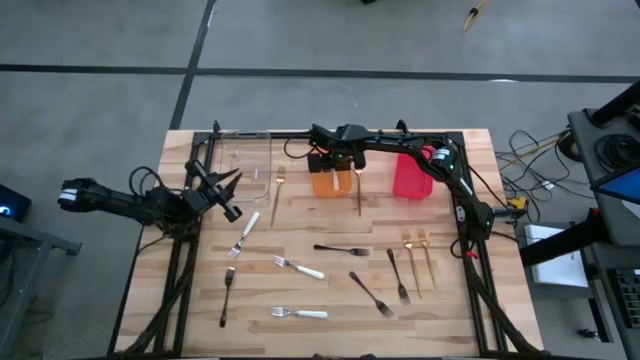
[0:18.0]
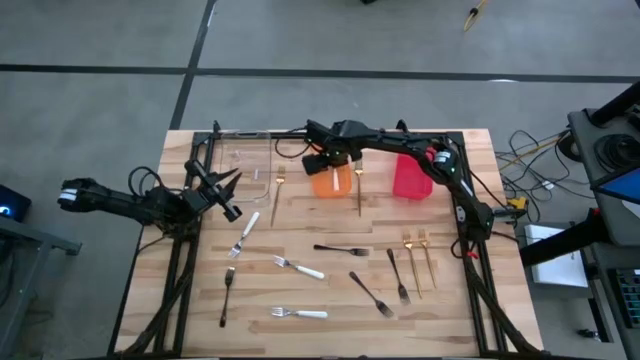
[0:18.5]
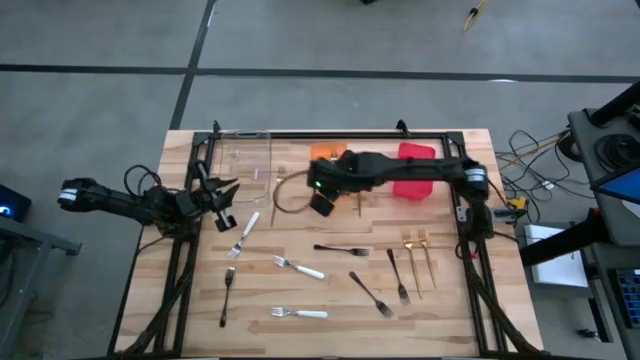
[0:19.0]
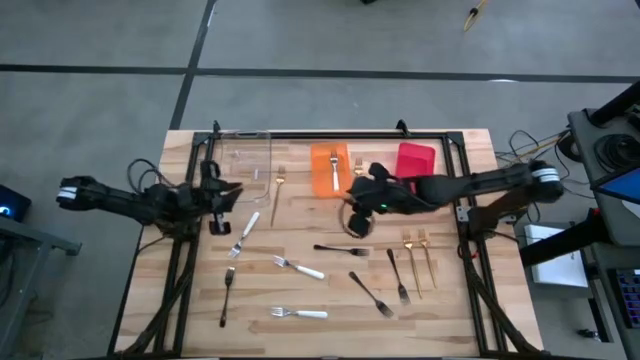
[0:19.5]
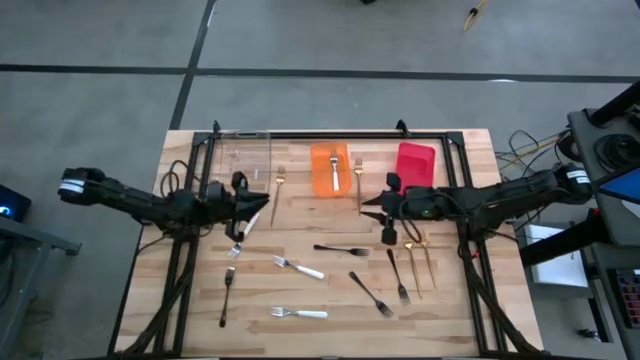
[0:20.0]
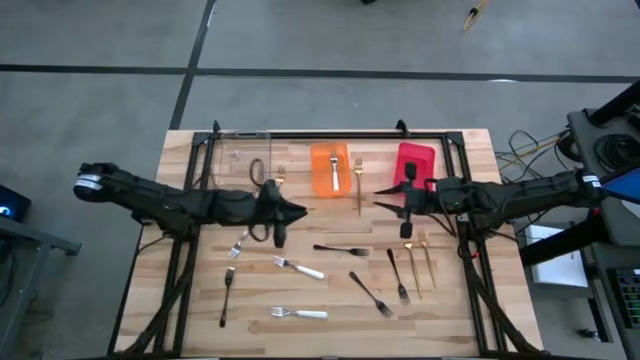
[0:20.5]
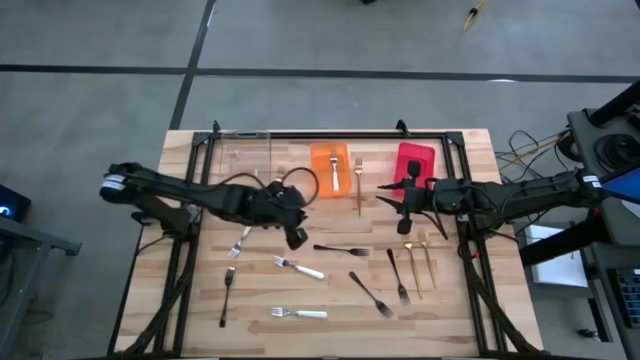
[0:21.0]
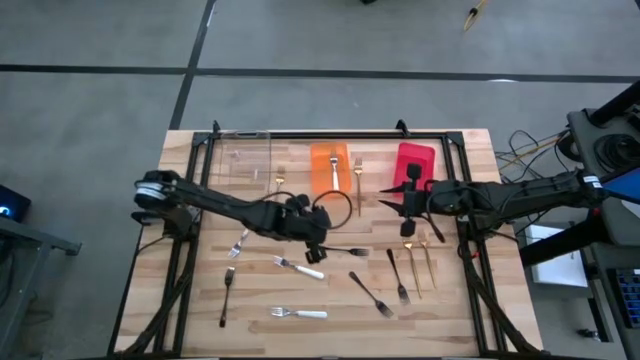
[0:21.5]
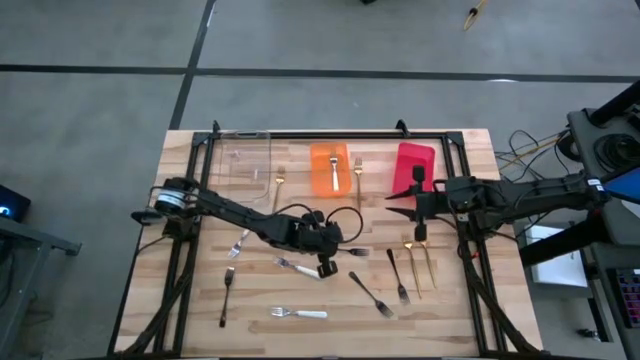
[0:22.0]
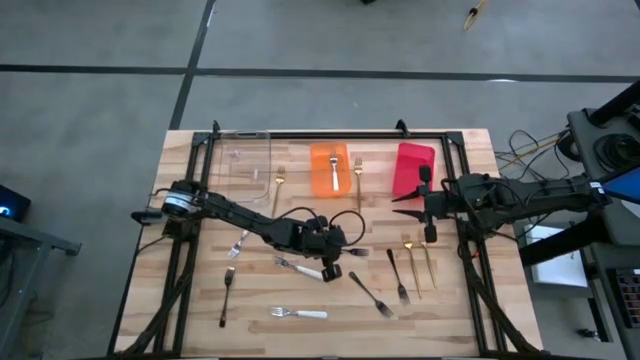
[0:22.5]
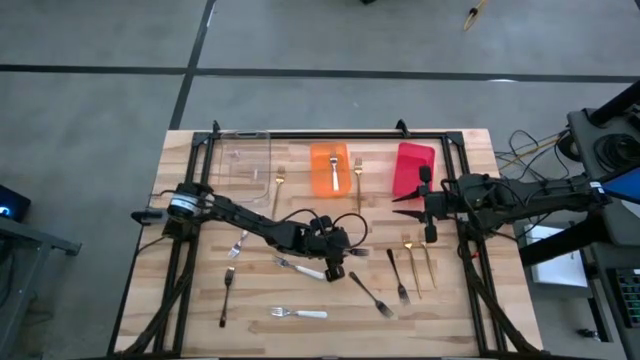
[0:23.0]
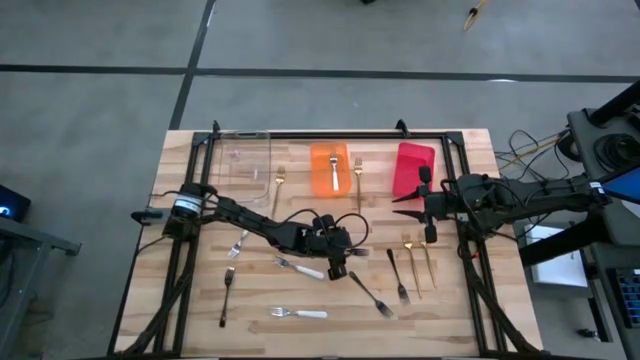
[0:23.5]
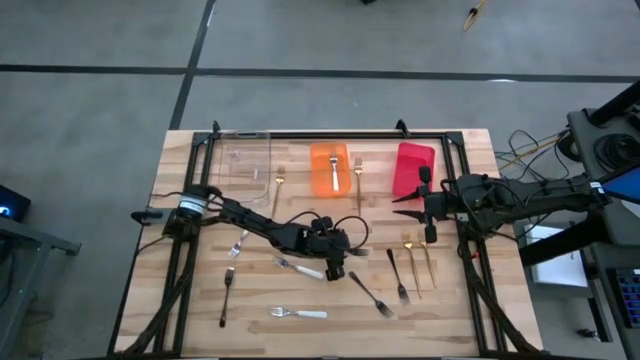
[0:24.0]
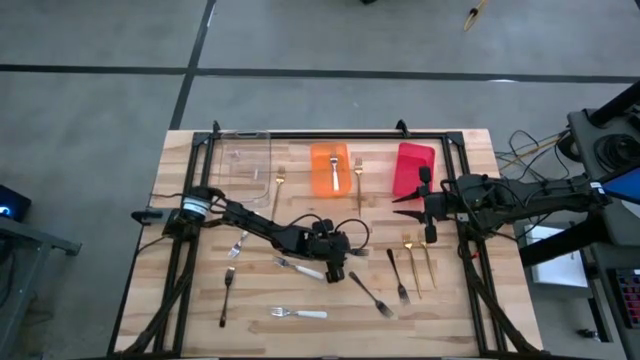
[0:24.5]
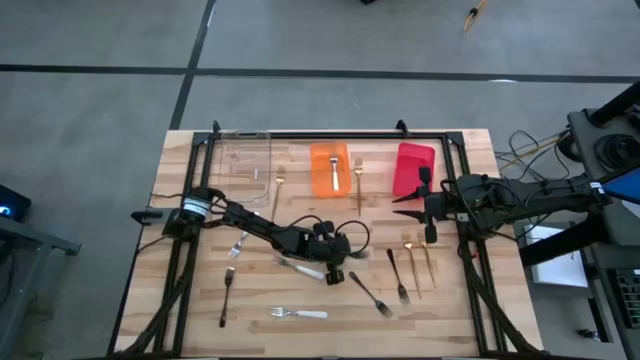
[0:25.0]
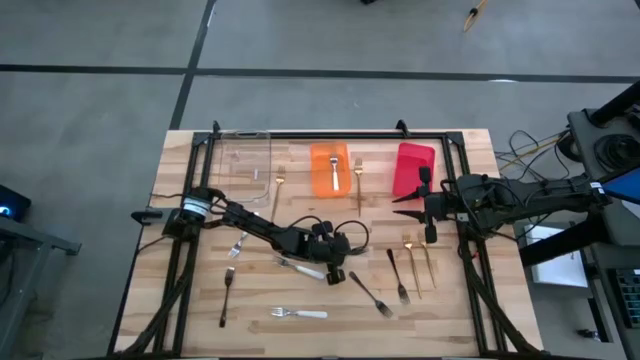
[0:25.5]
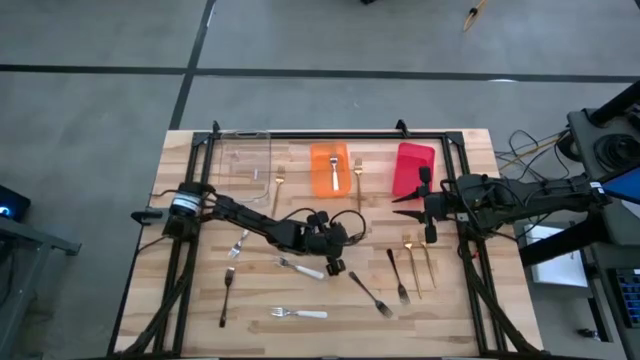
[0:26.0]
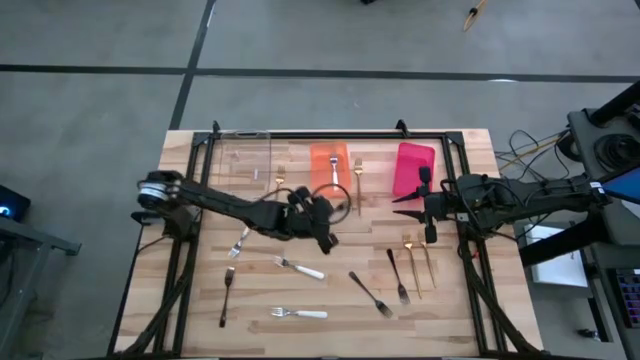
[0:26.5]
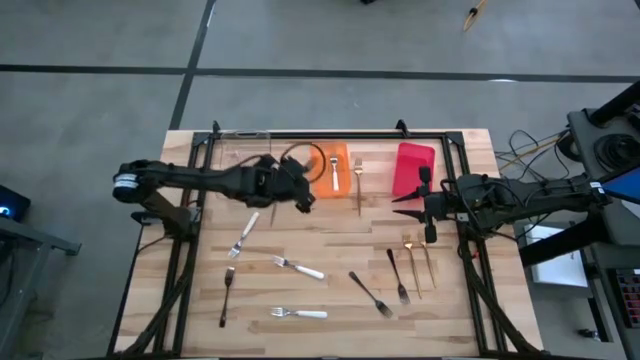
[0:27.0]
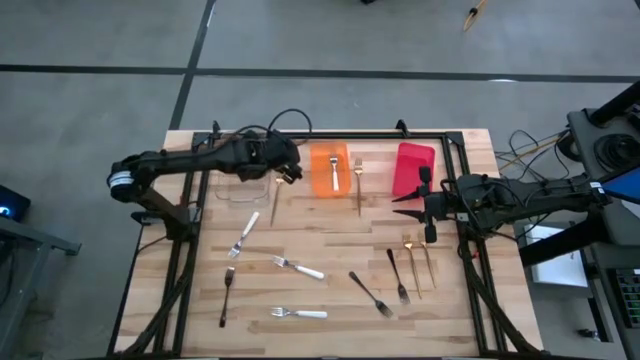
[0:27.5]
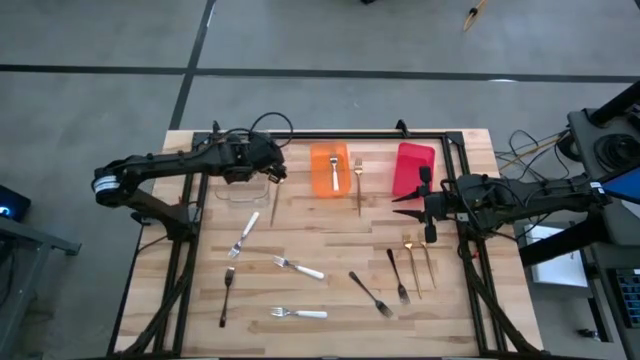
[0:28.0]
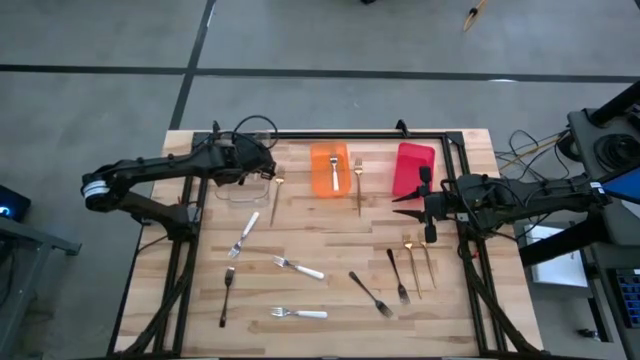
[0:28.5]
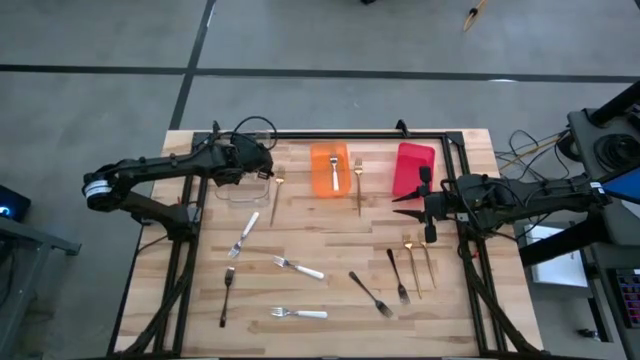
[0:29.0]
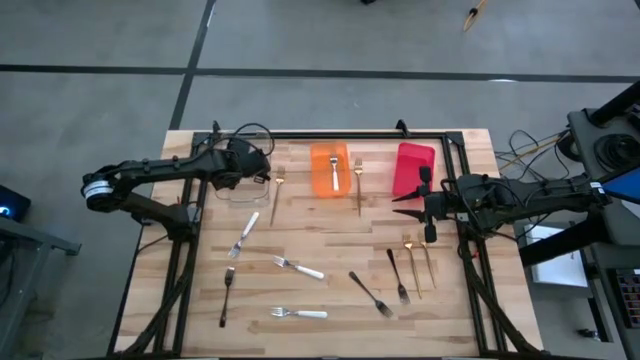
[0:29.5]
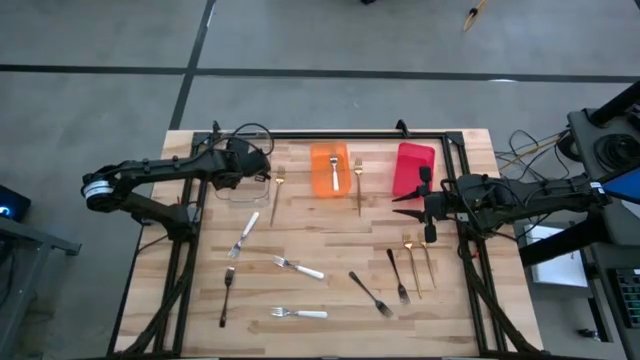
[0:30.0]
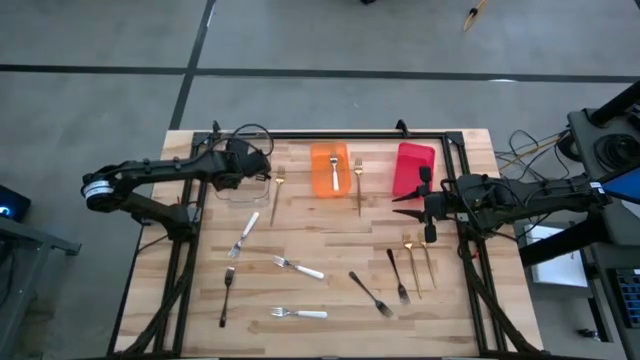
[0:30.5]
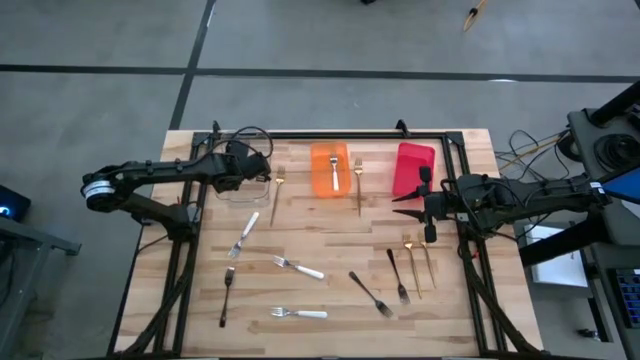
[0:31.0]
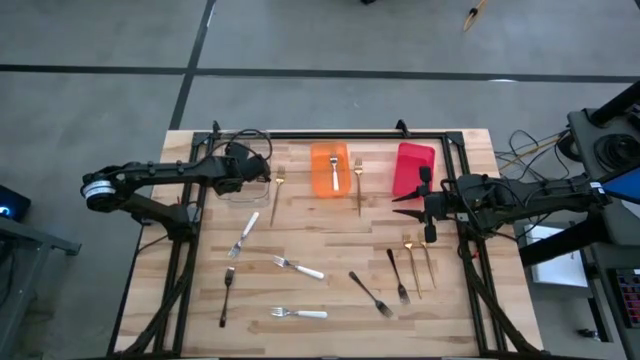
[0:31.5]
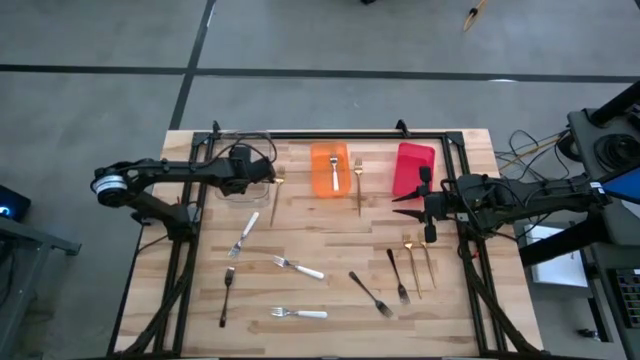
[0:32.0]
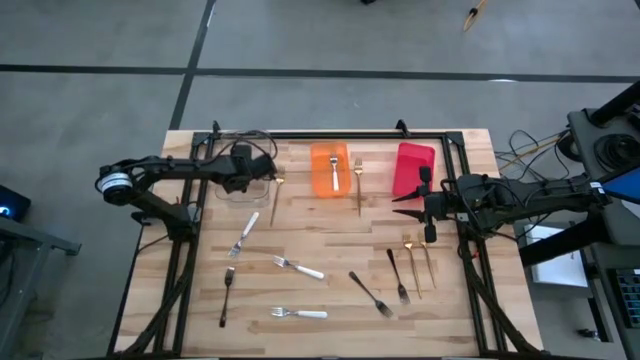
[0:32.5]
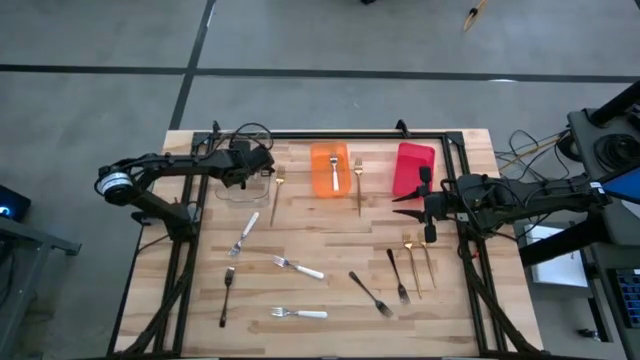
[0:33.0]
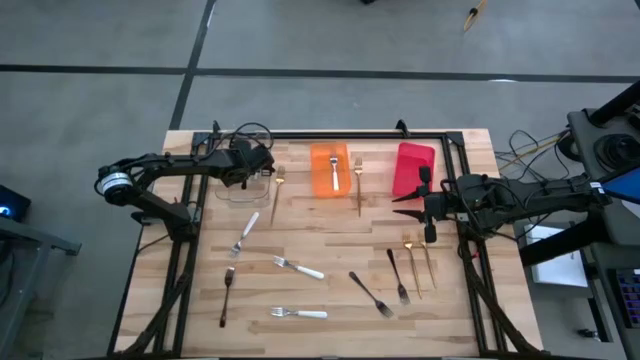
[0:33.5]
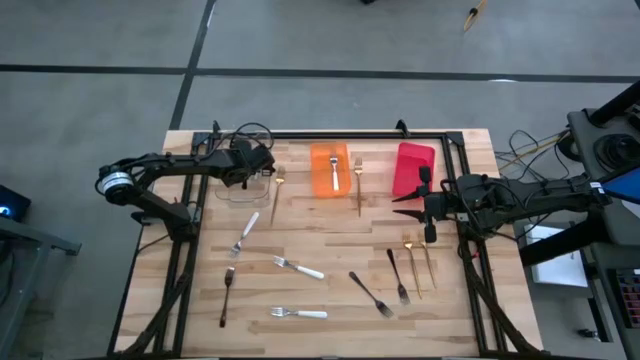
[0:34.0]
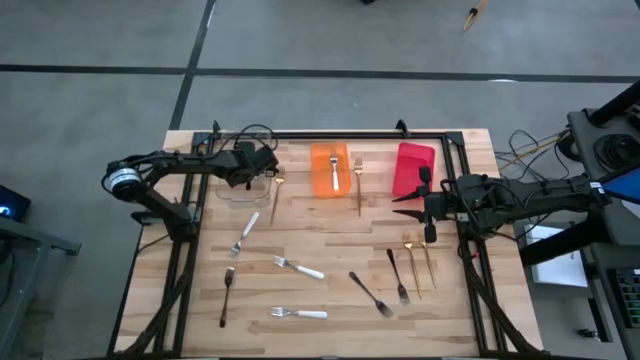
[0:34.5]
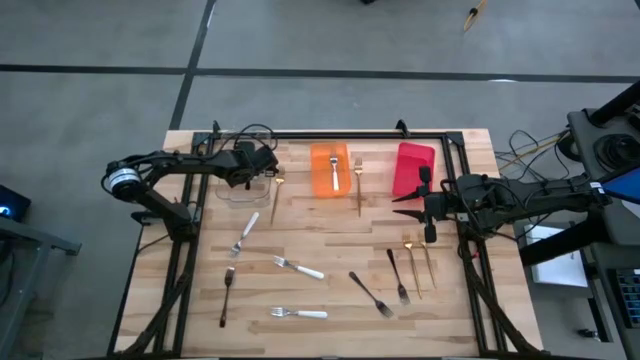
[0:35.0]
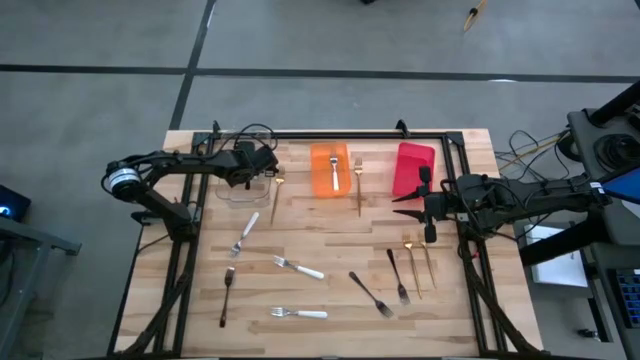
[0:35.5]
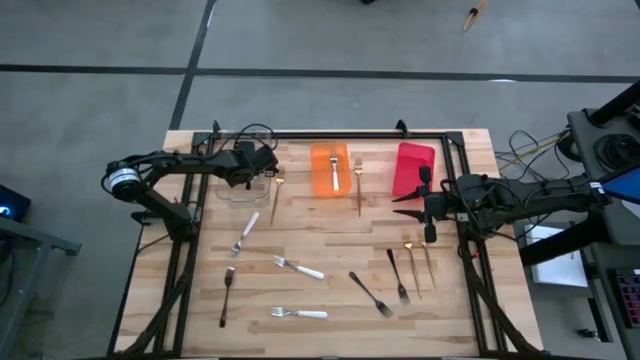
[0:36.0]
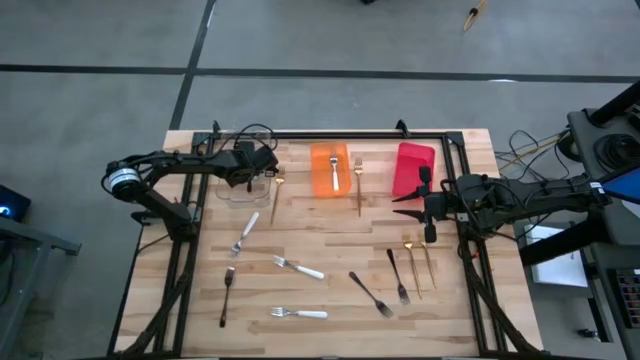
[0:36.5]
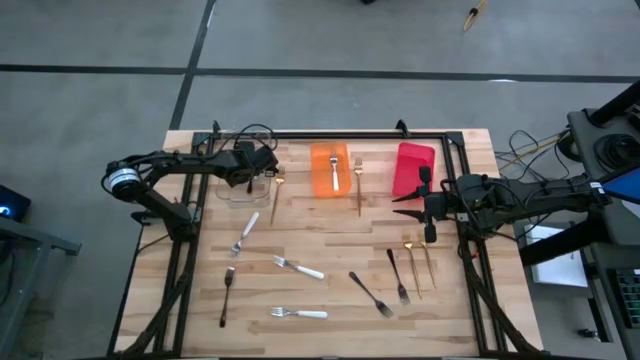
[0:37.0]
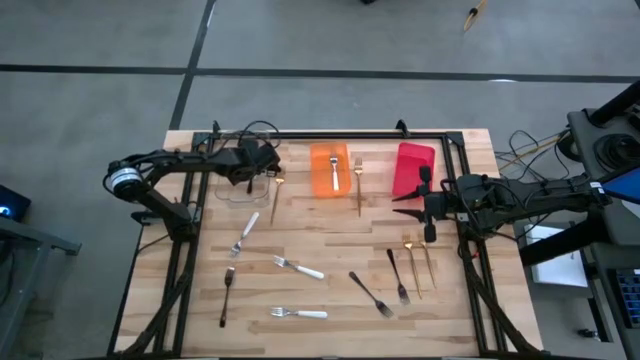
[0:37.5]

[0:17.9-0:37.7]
Task: Sort silverware by color (type)
Put the top center black fork into the transparent bin
